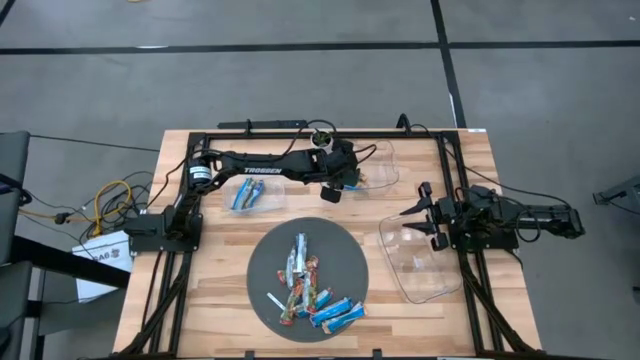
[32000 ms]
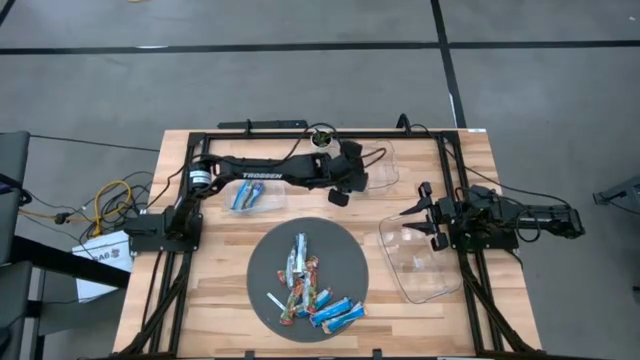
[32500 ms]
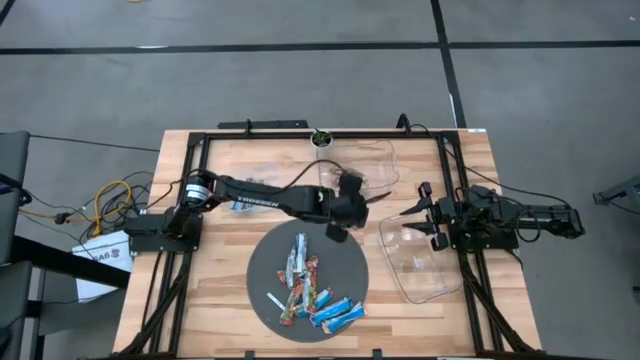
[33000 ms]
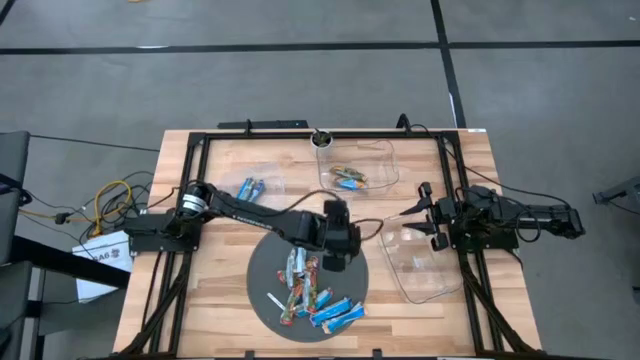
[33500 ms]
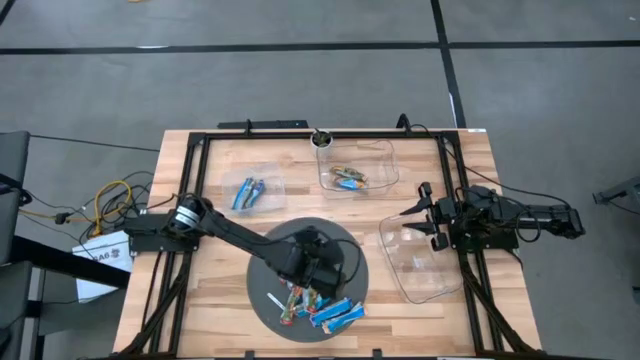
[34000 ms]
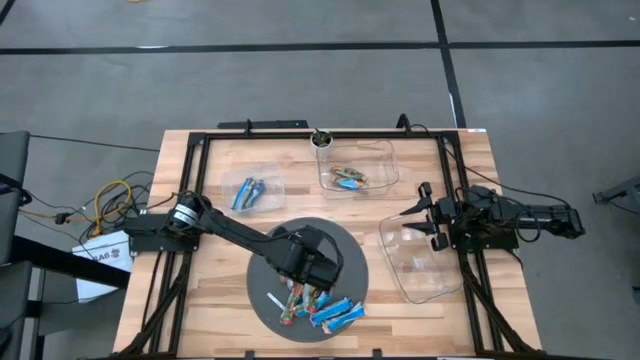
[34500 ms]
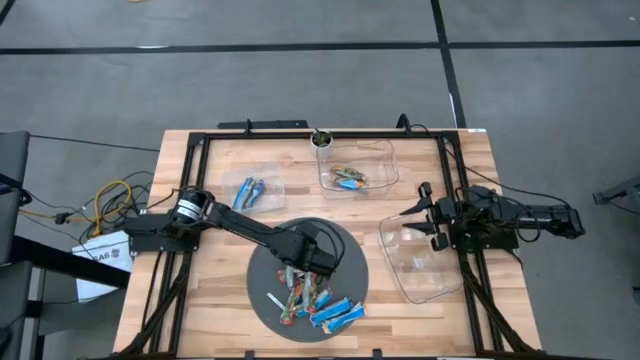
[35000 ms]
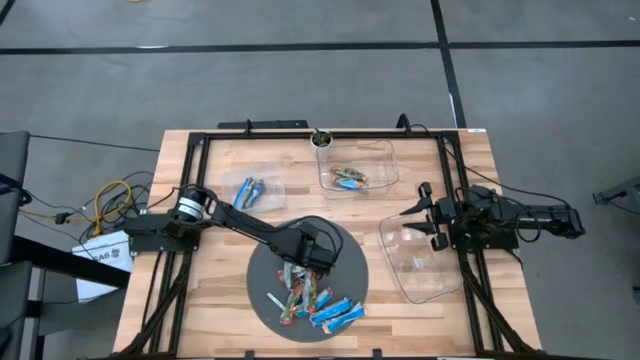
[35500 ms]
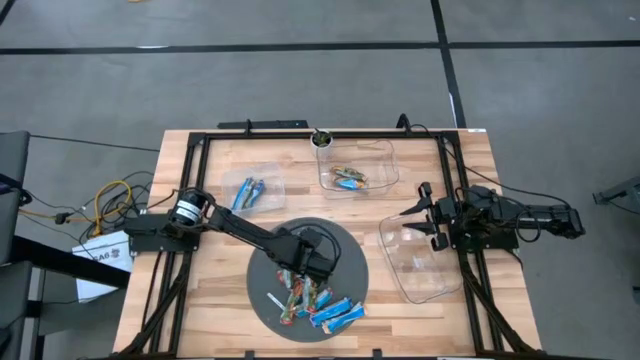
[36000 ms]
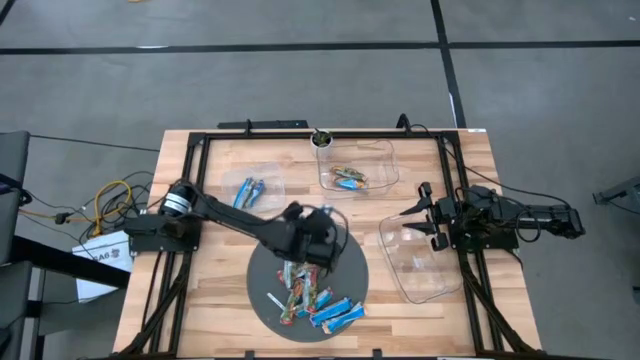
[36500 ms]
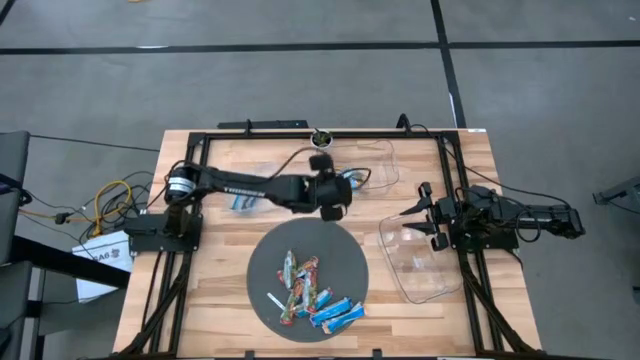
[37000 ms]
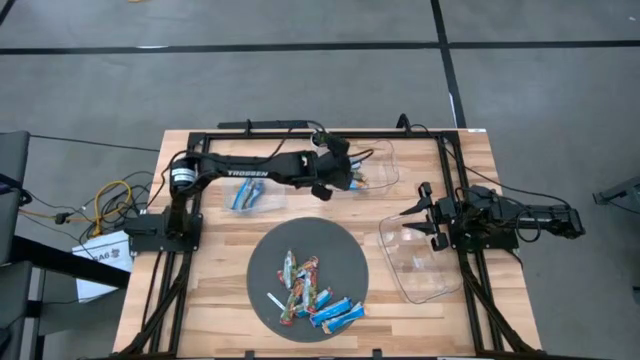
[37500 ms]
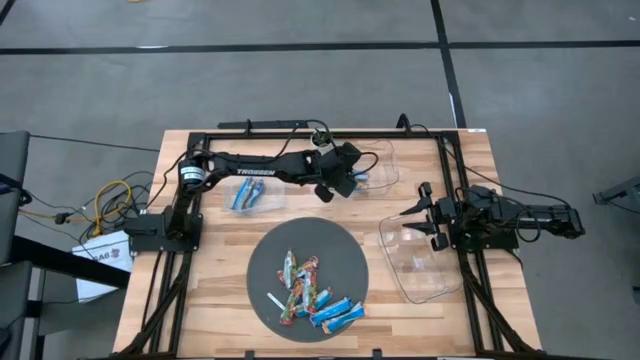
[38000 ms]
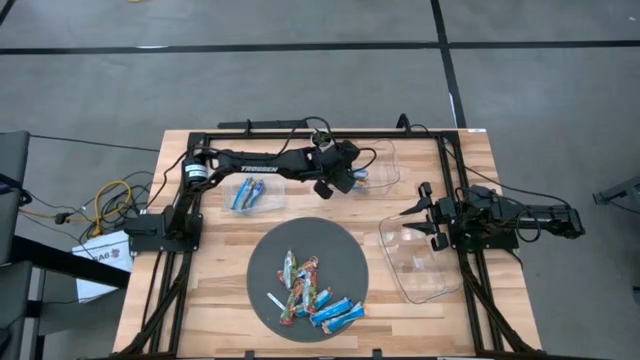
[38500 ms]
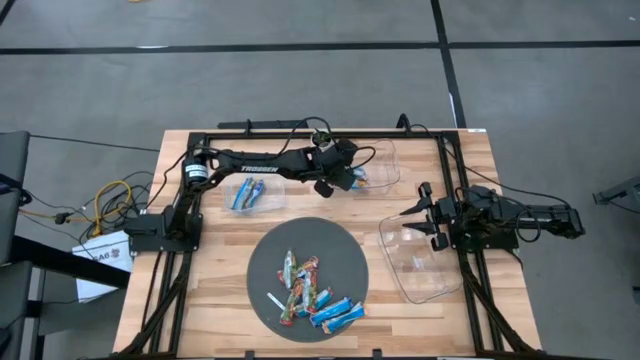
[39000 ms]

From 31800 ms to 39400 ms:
Task: Pick and place Granola Bars by type
Put the yellow granola bar into the top transparent bin

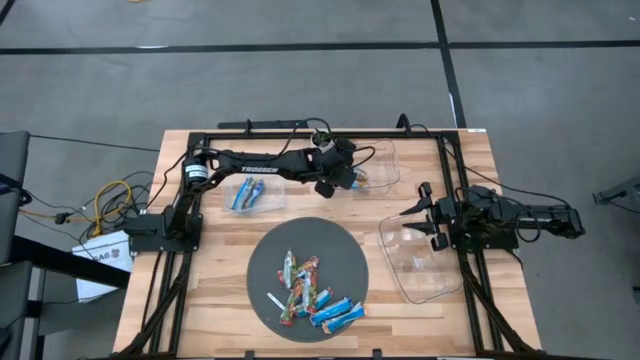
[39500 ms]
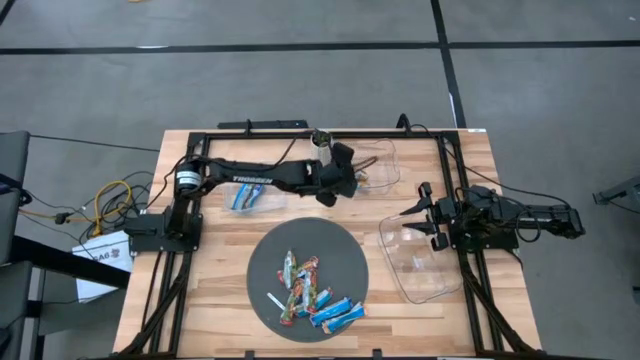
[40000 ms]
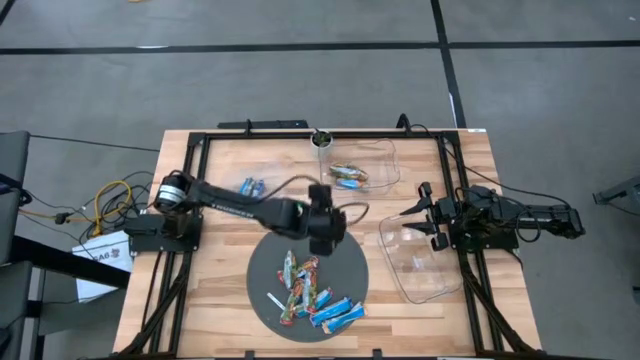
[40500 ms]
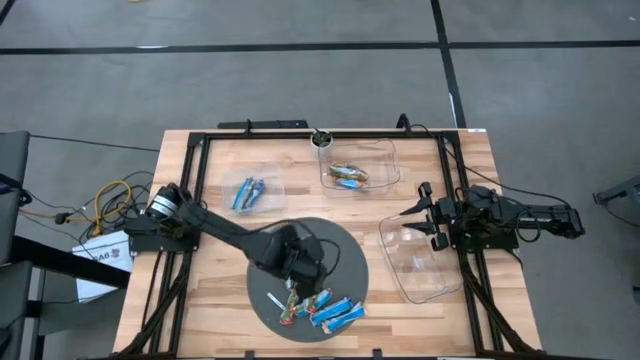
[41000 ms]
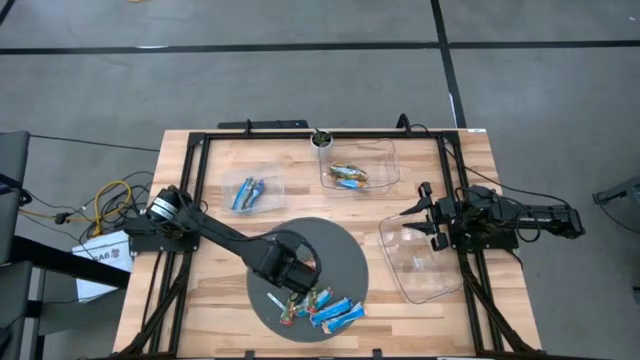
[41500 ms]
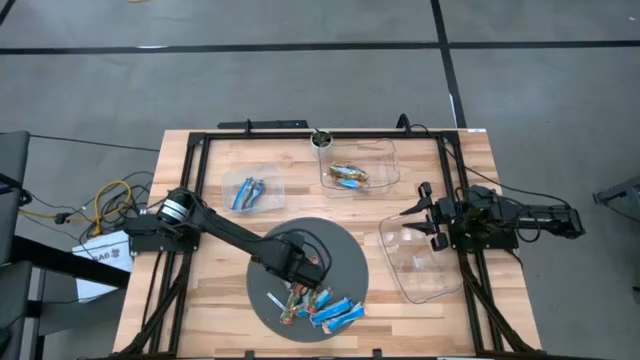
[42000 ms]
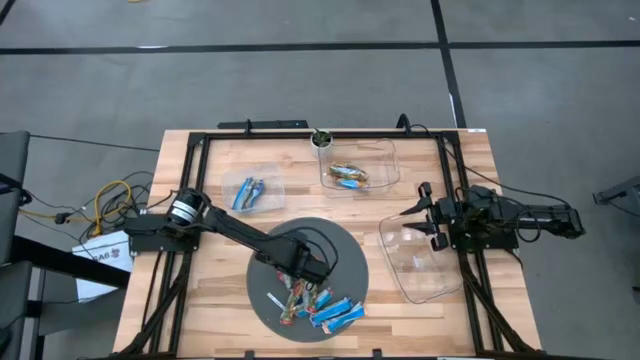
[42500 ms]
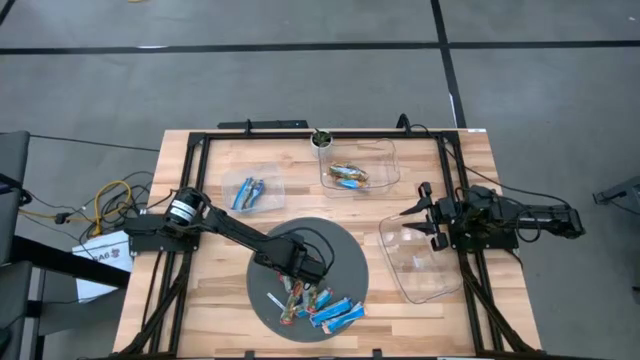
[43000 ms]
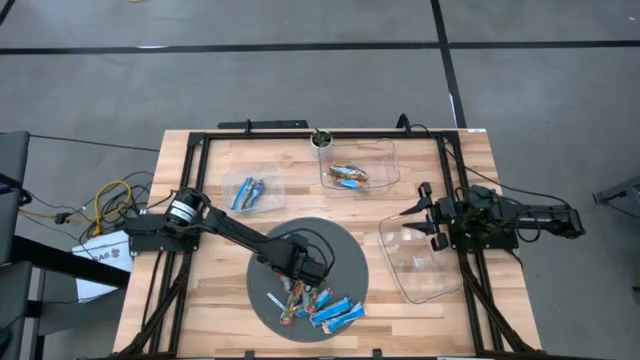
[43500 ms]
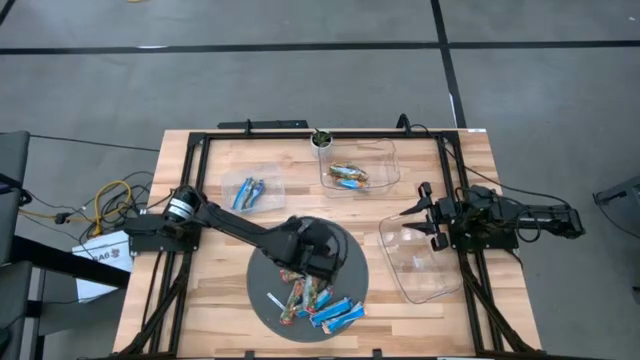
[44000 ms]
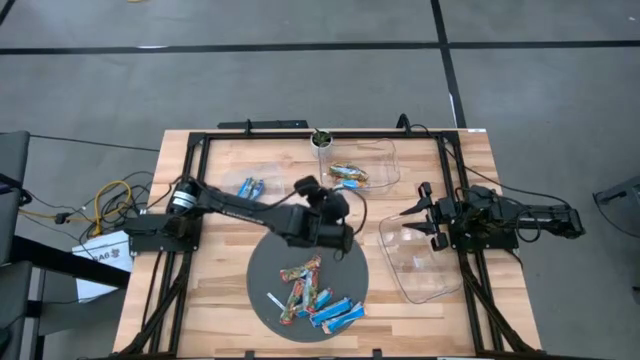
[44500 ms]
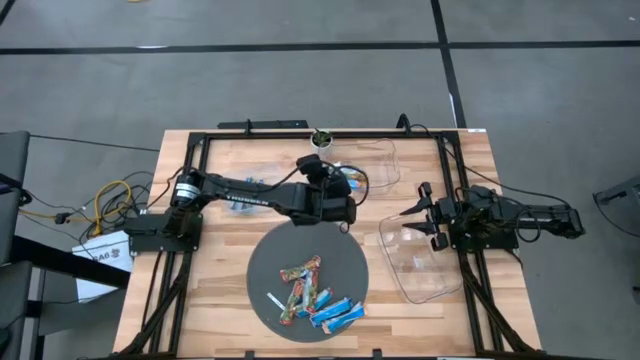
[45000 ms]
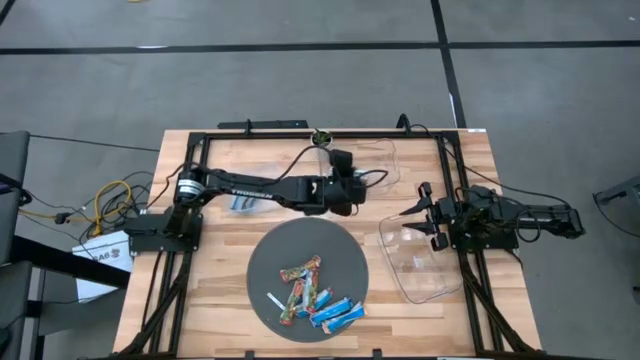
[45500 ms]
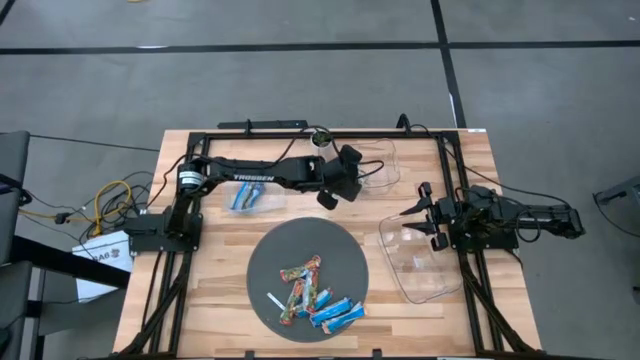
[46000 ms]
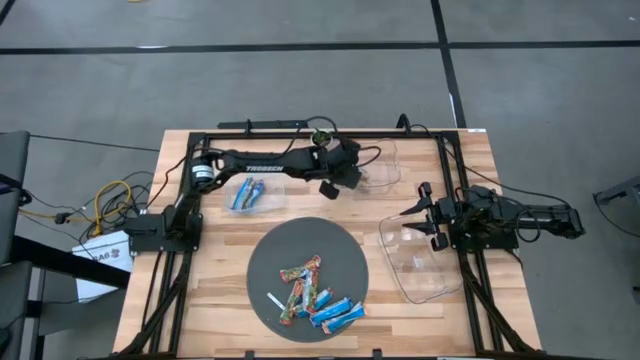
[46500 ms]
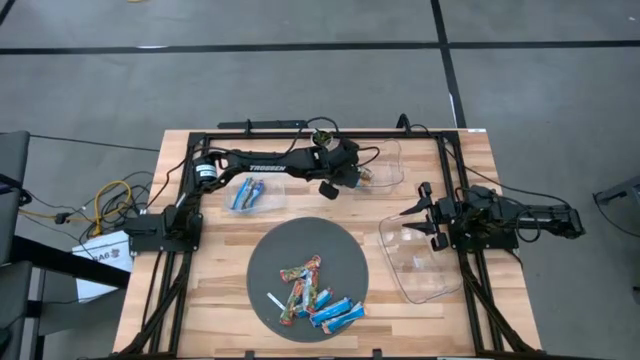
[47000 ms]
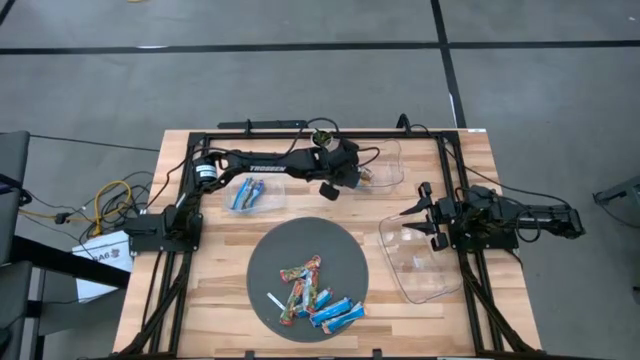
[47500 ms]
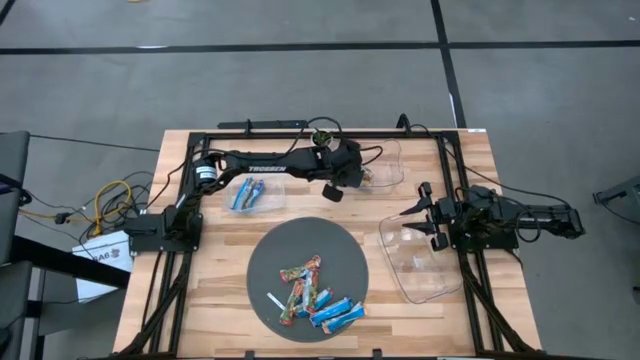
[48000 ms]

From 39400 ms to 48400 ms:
Put the yellow granola bar into the top transparent bin

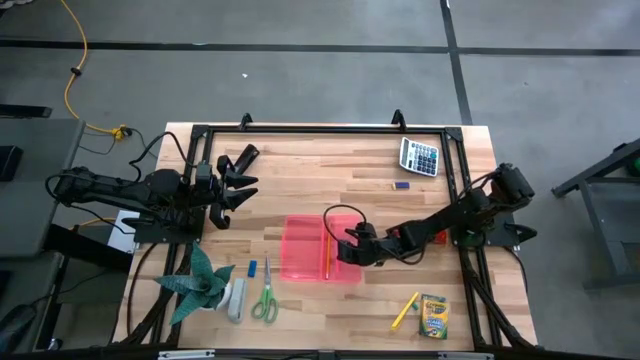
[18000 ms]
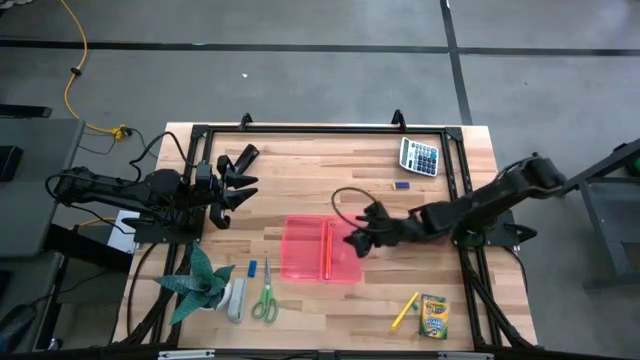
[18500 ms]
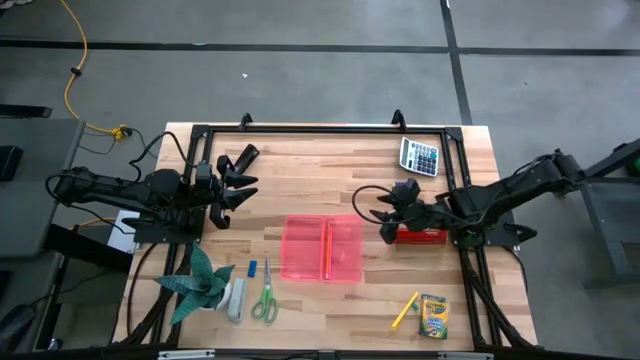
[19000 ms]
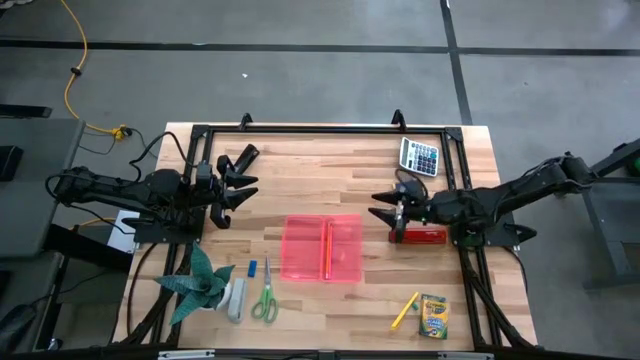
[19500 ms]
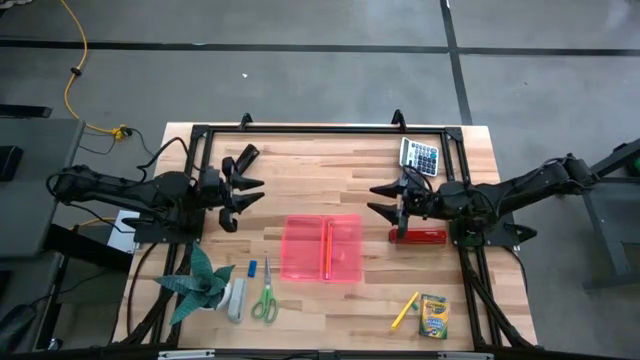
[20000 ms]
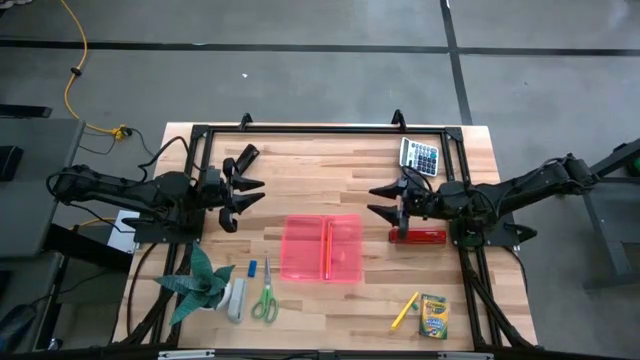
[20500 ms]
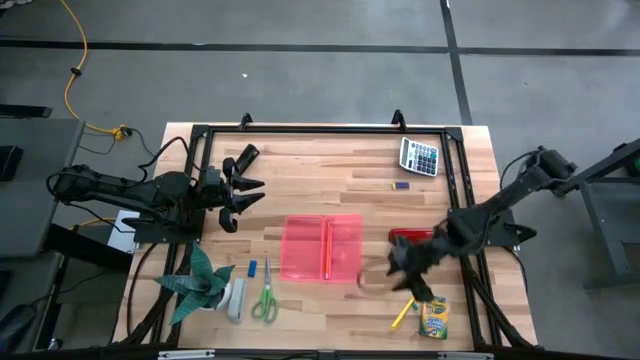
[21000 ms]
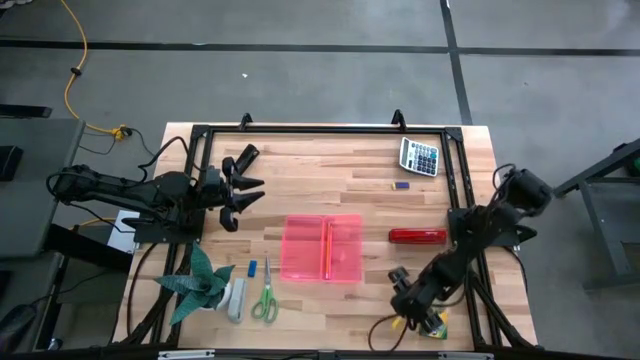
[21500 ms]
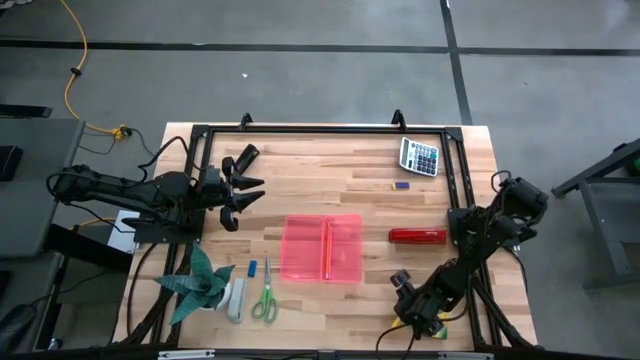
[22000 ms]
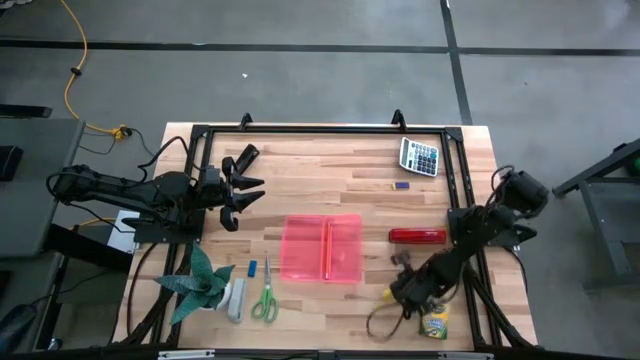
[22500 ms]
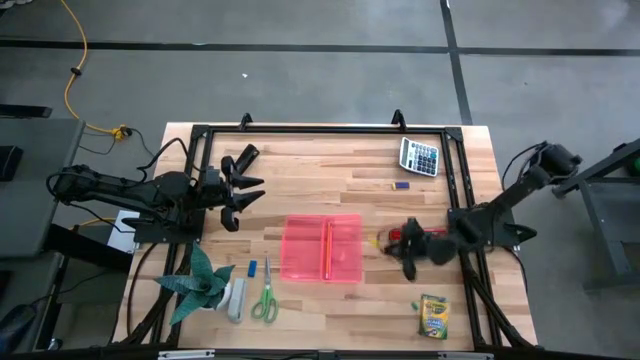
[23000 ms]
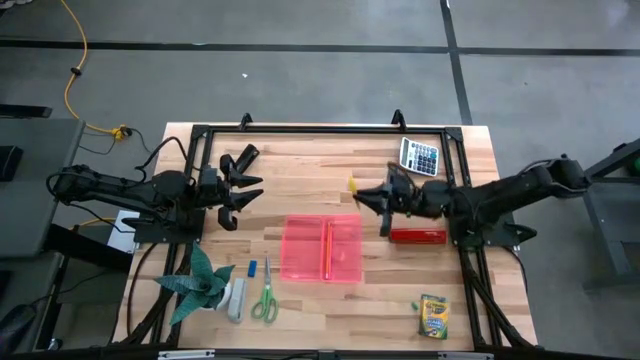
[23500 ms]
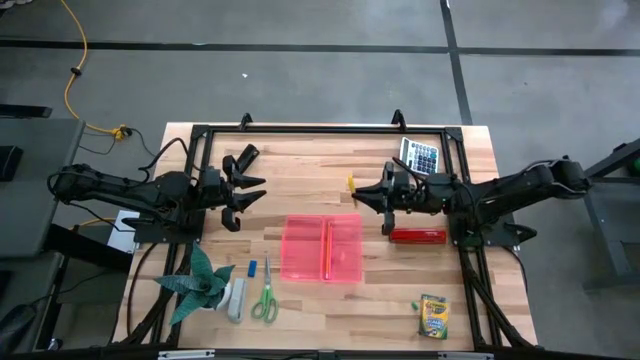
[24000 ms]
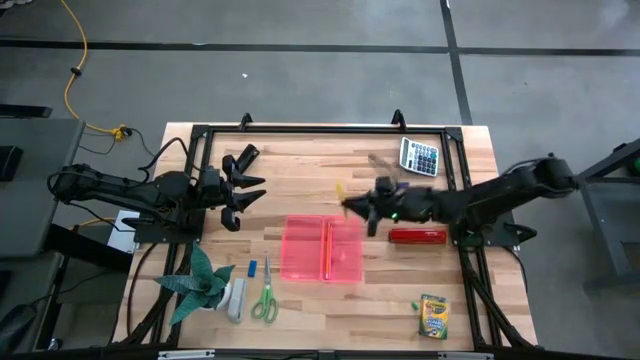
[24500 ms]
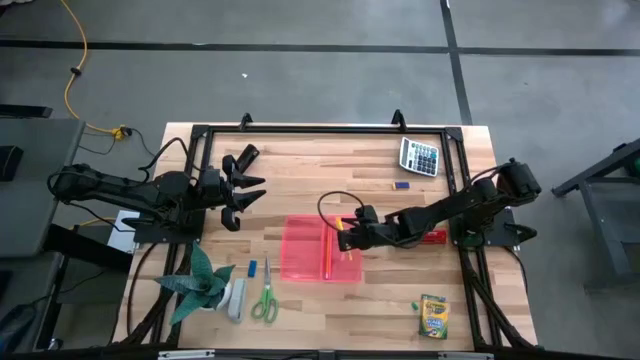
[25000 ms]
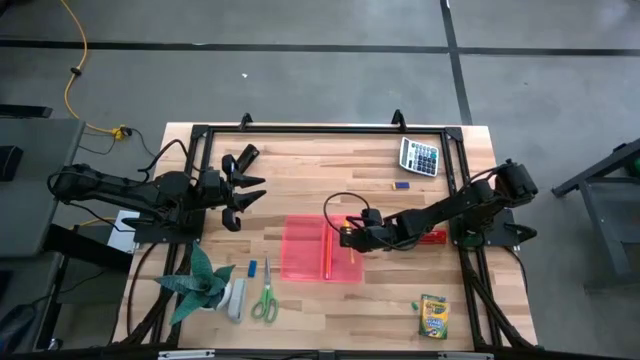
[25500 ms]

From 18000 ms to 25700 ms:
Task: Pack school essentials
Put the yellow pen into the pink supply box
